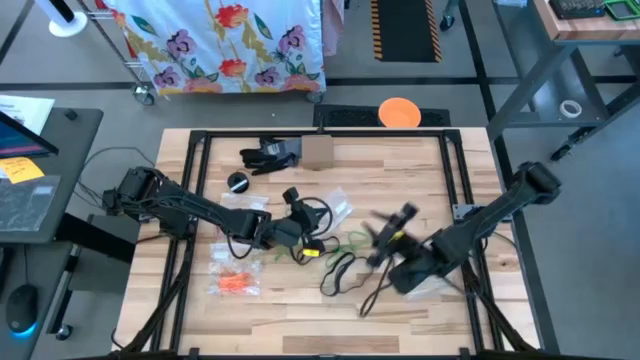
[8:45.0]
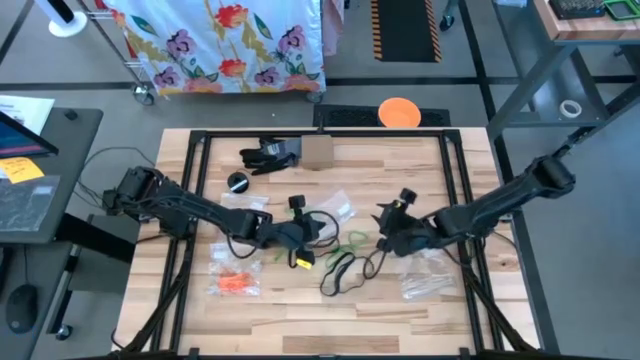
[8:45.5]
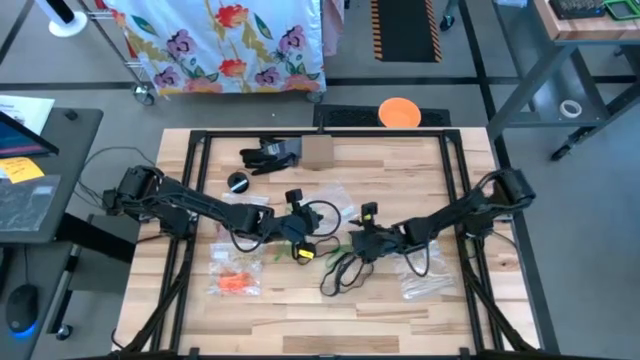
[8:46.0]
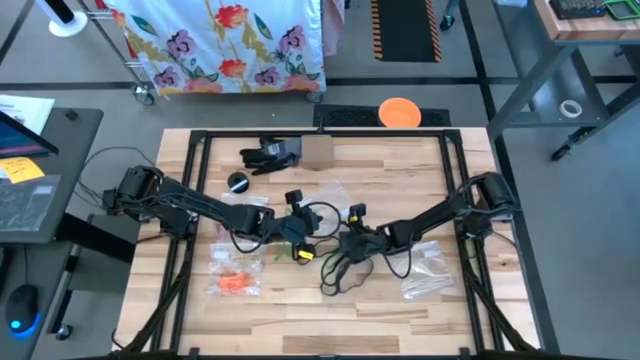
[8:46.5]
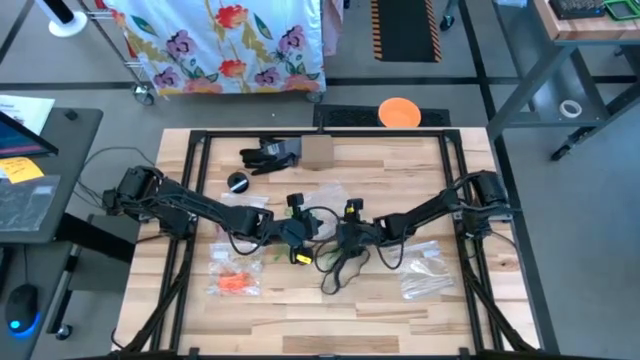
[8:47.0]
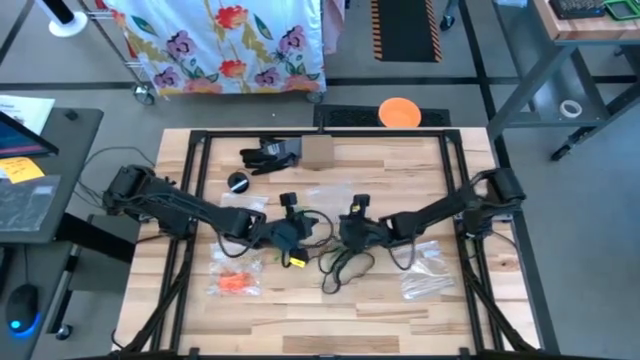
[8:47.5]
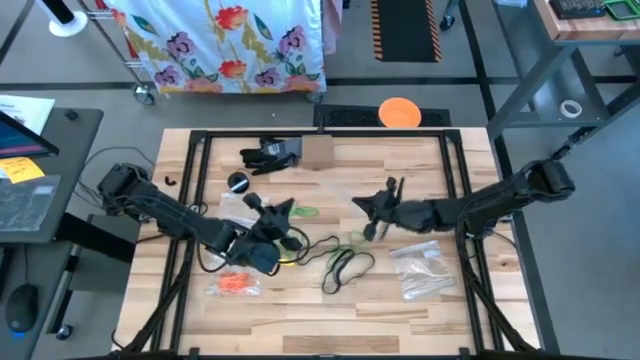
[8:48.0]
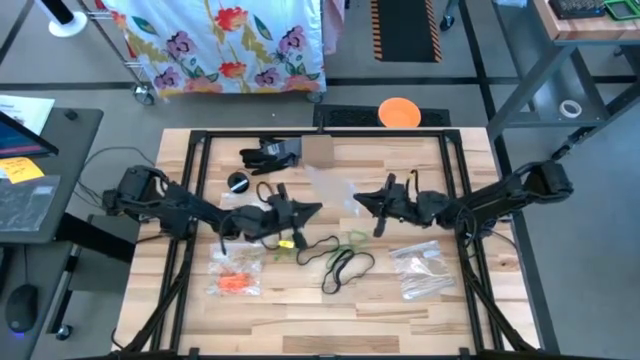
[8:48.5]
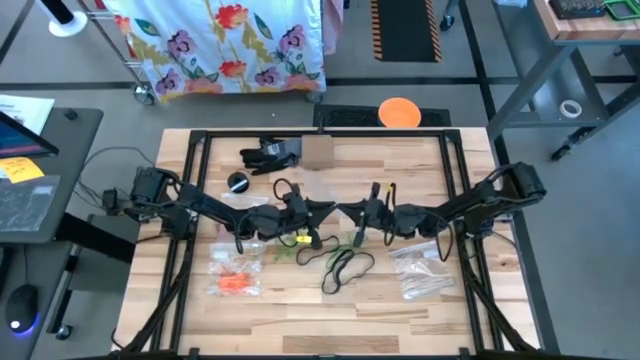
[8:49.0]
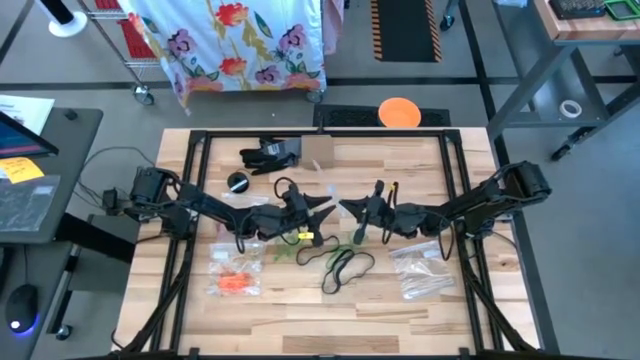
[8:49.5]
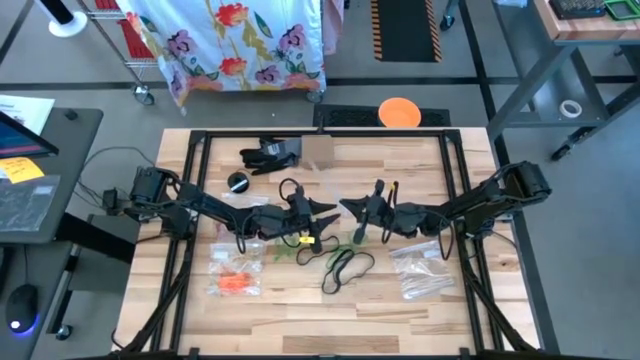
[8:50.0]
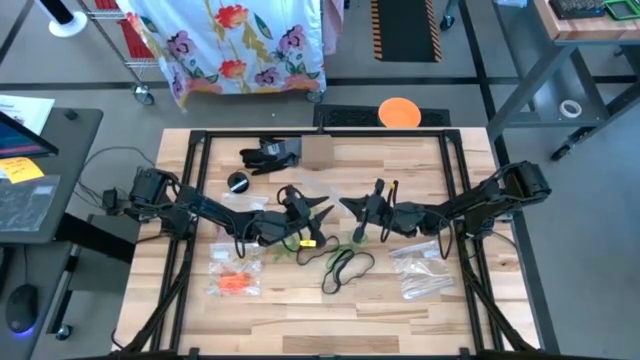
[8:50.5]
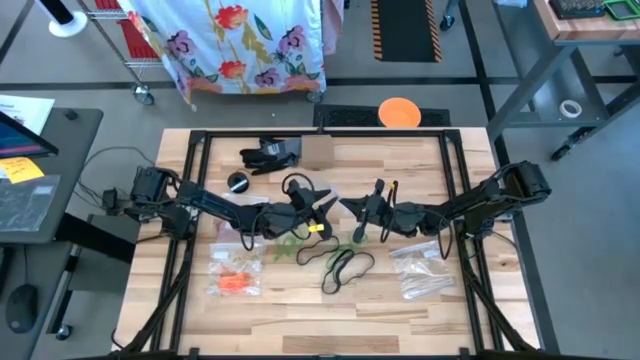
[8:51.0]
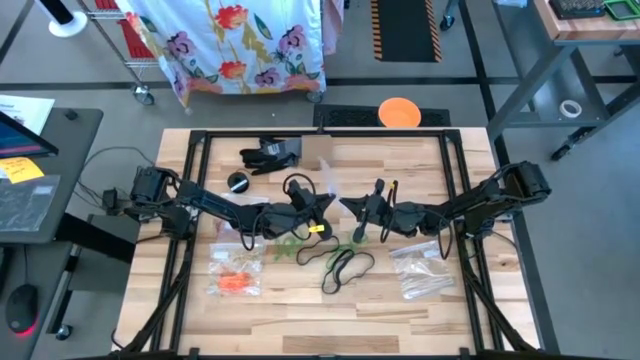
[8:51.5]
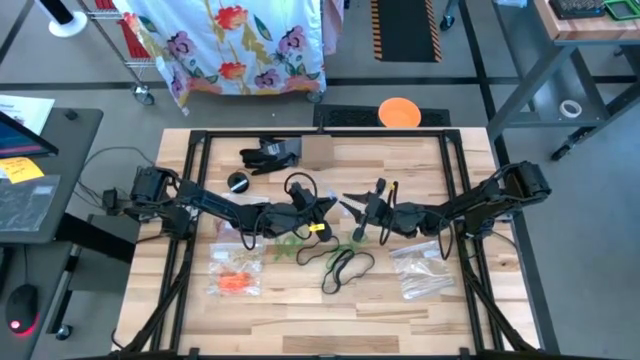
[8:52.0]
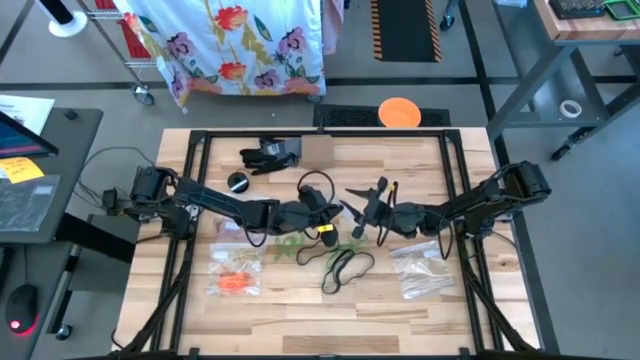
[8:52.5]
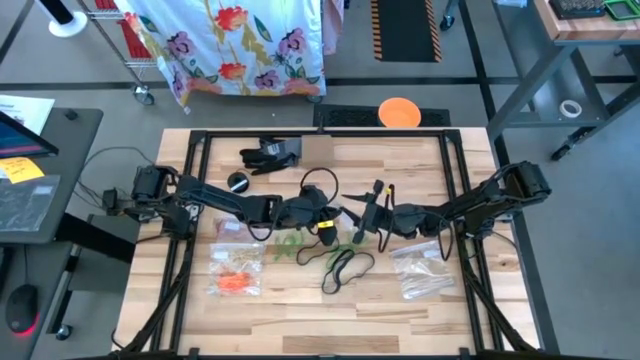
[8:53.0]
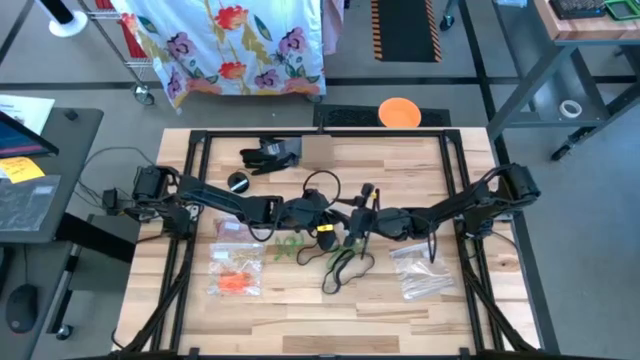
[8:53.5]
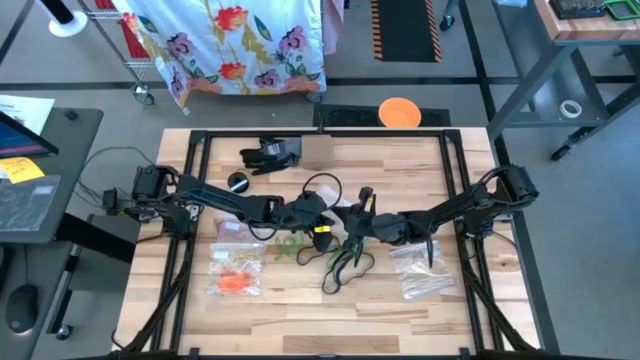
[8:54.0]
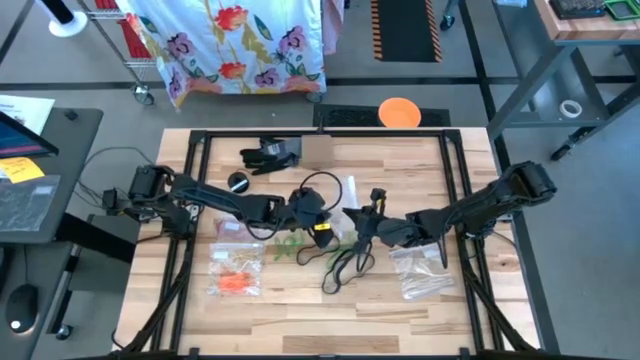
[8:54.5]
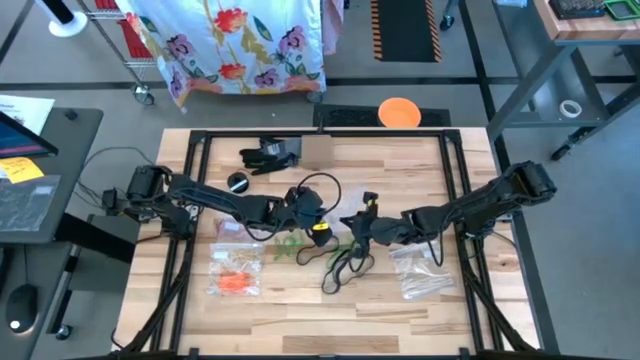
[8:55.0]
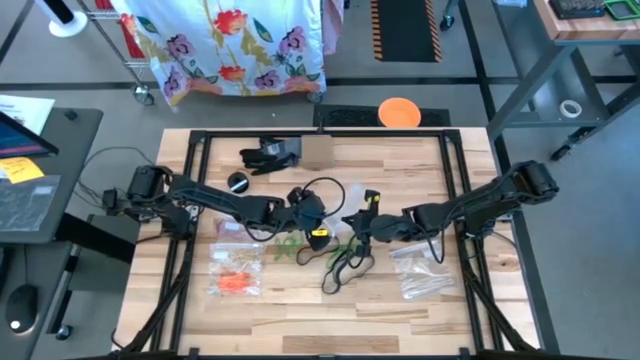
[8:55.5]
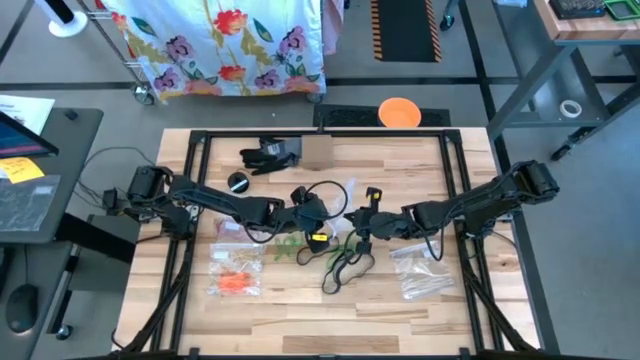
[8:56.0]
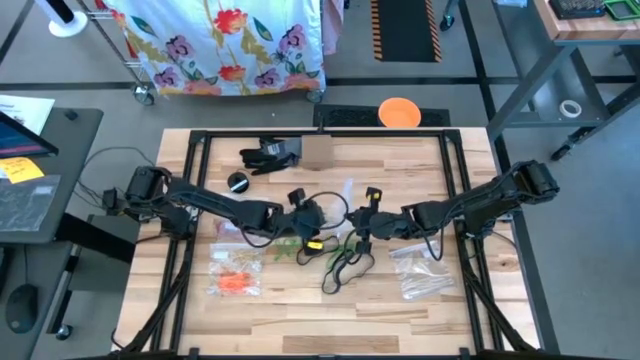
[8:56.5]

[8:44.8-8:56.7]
Task: Sort rubber bands
Open the transparent zip bag

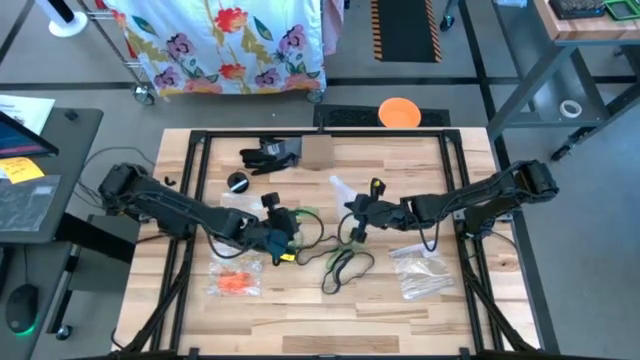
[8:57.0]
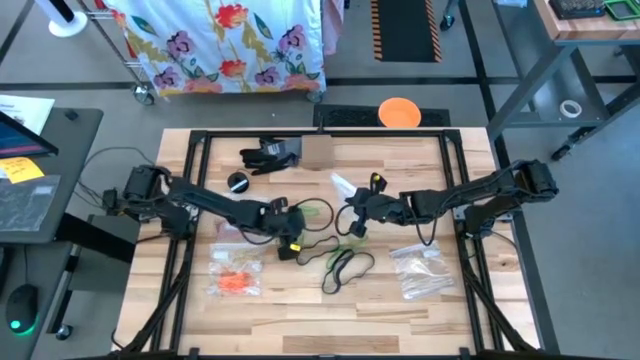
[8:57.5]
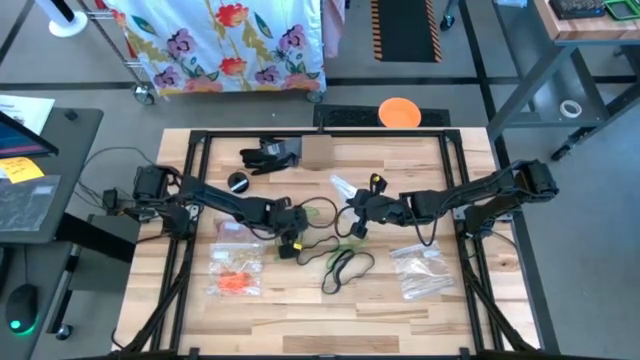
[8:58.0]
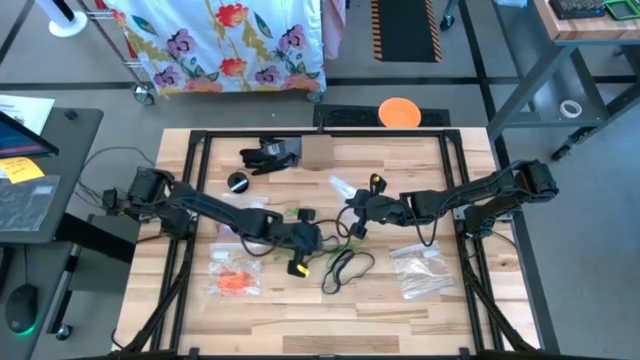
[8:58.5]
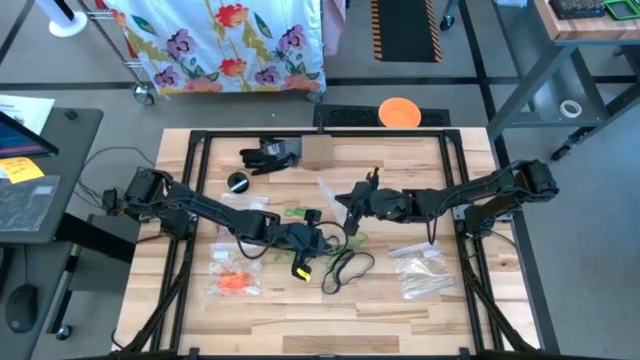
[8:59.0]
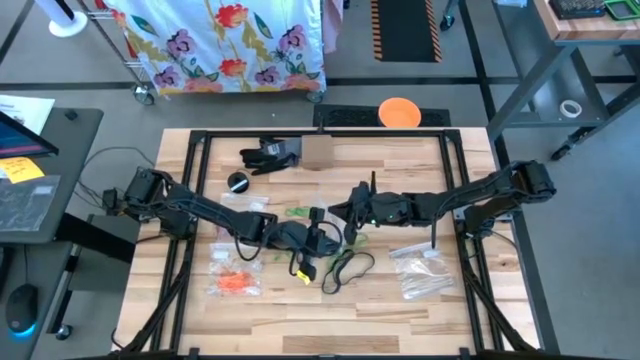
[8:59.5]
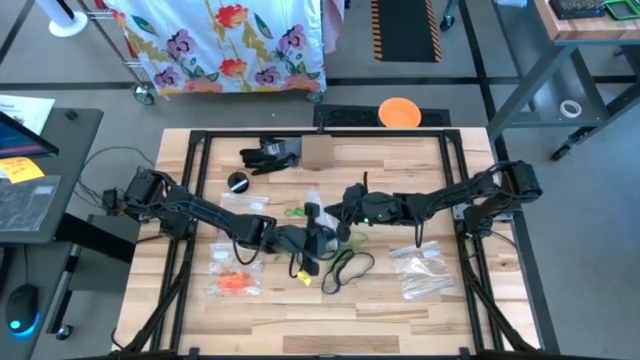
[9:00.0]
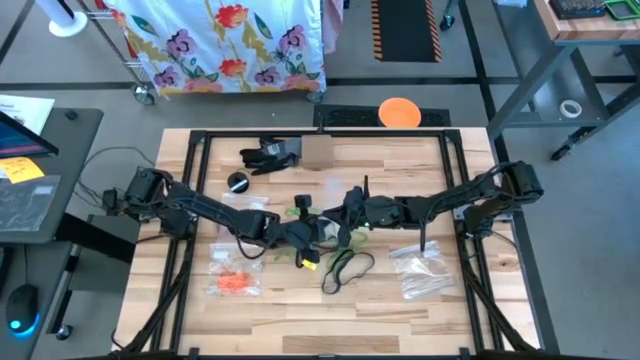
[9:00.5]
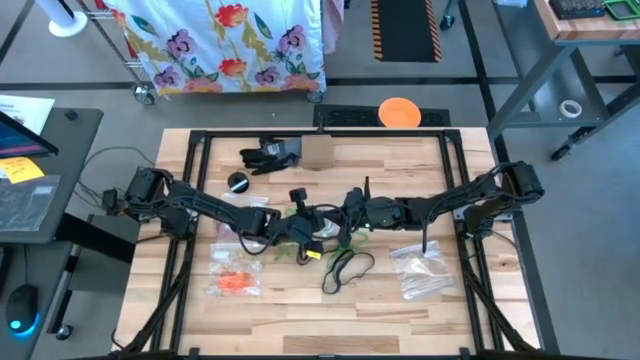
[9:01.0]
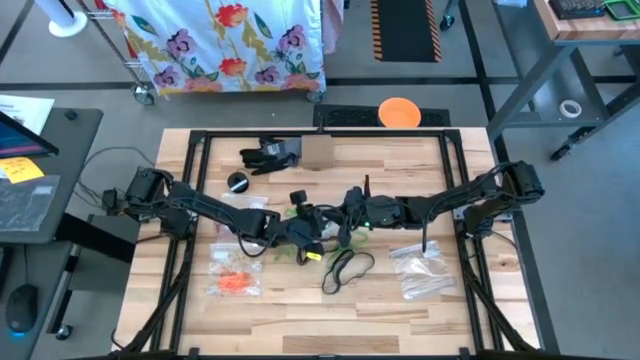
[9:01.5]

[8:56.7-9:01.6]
Put the green rubber band into the transparent zip bag

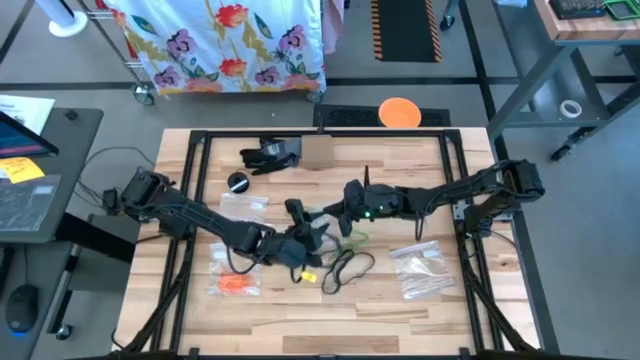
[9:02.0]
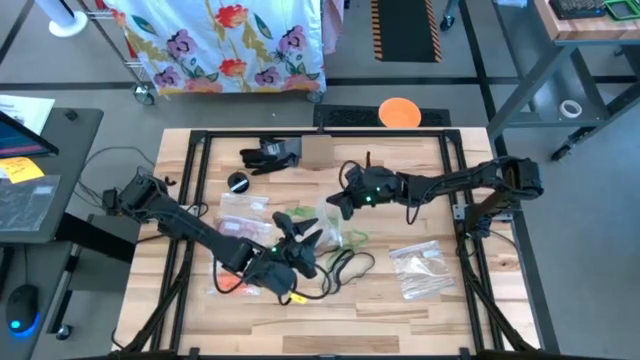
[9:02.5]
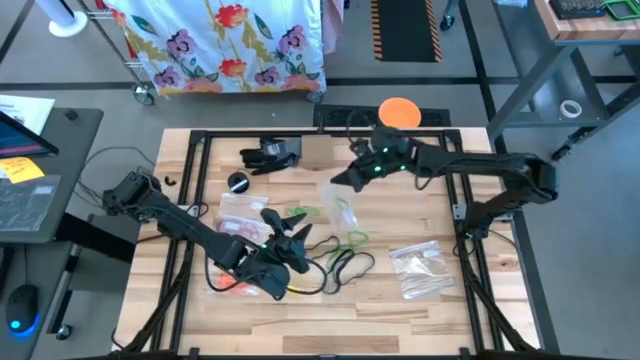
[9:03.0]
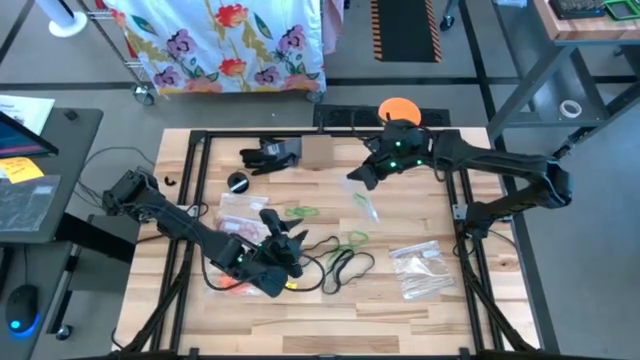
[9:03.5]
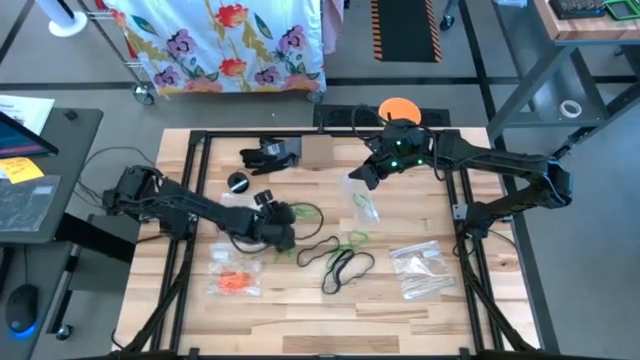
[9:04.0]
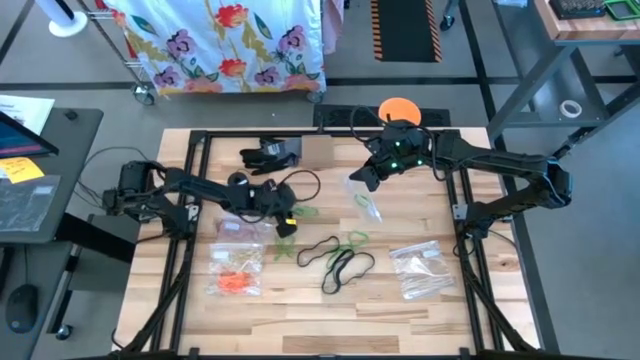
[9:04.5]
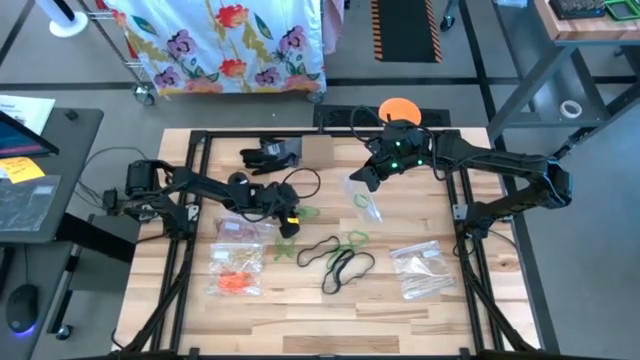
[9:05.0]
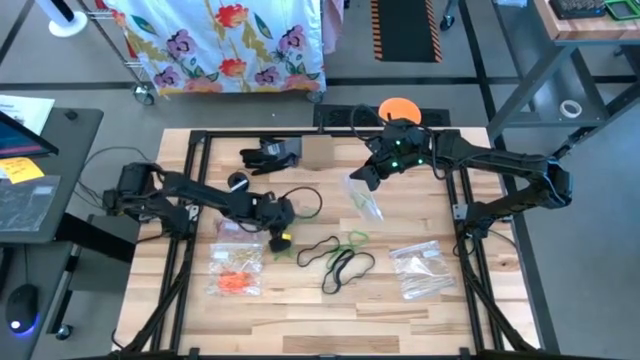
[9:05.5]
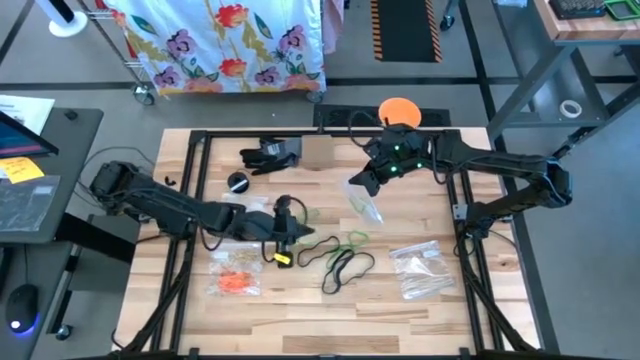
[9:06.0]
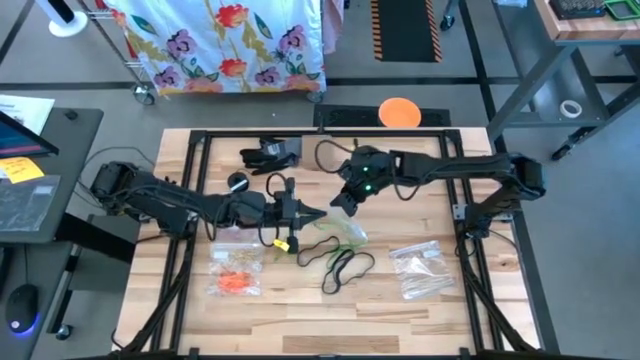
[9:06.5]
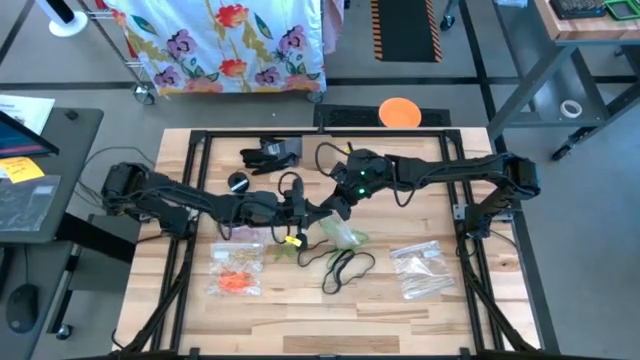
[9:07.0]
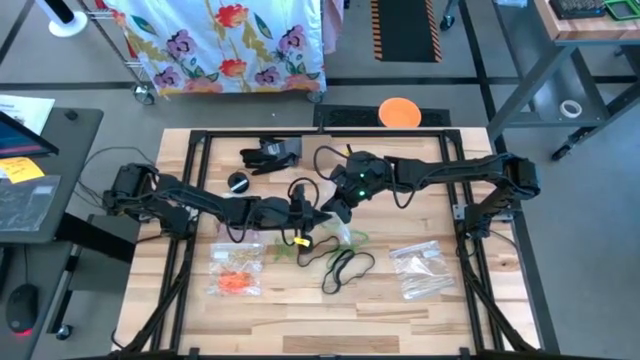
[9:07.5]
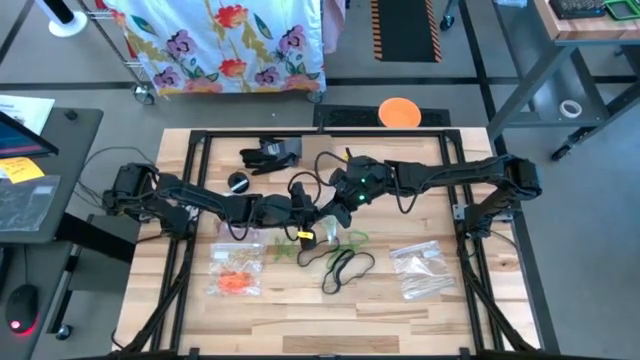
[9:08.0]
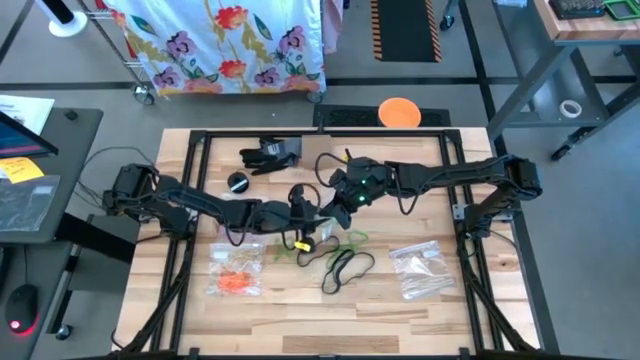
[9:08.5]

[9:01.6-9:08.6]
Put the green rubber band into the transparent zip bag
